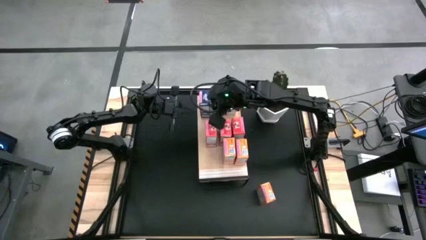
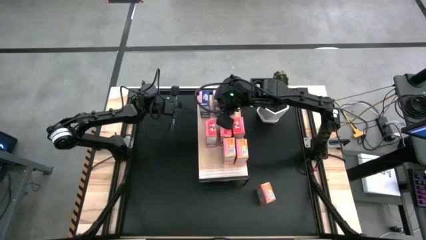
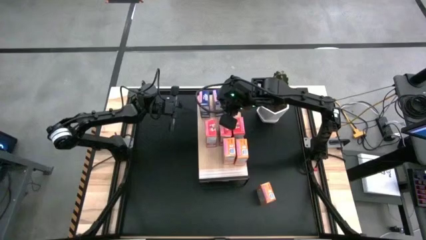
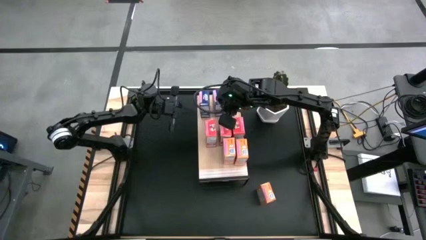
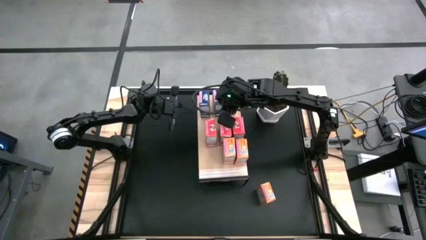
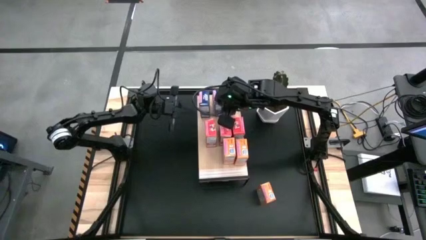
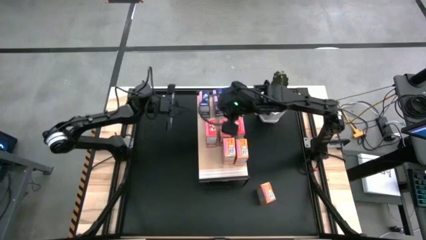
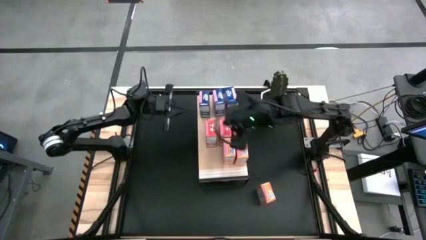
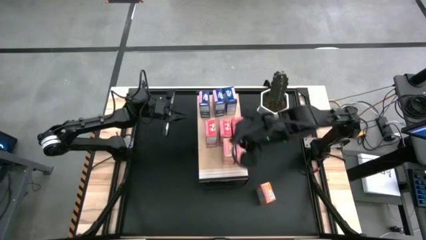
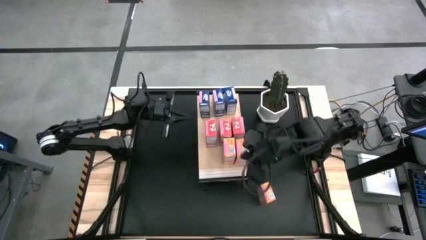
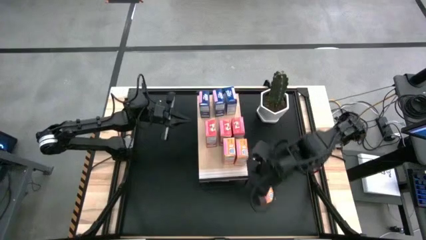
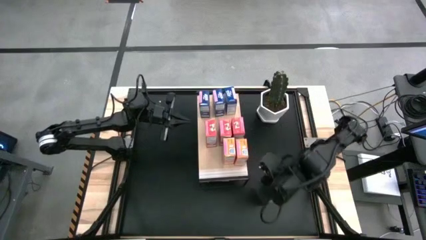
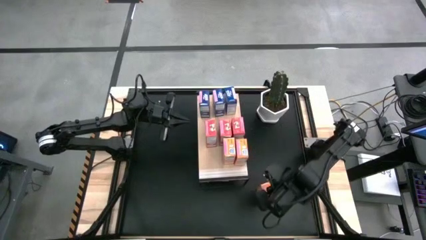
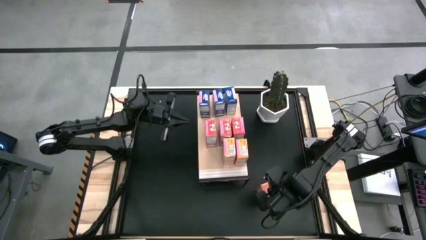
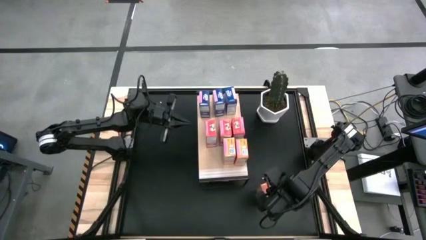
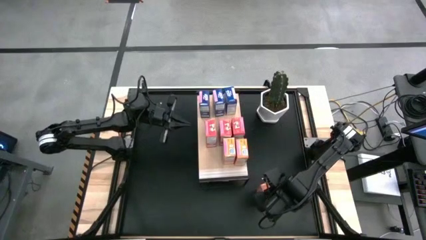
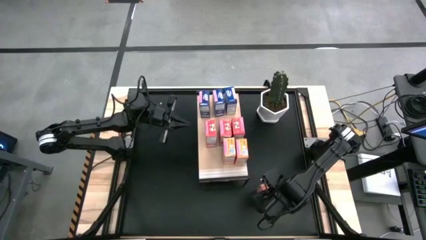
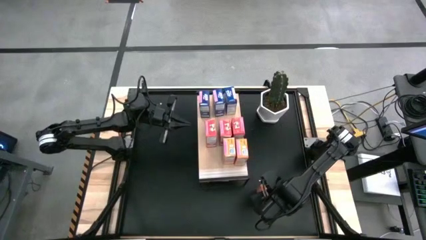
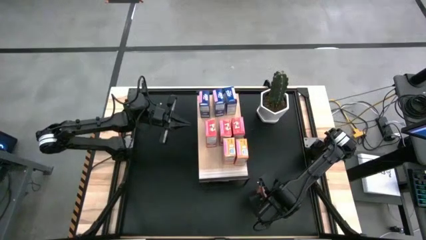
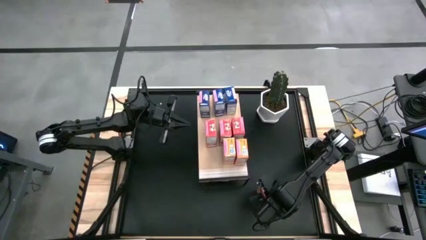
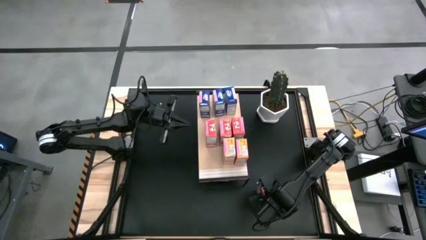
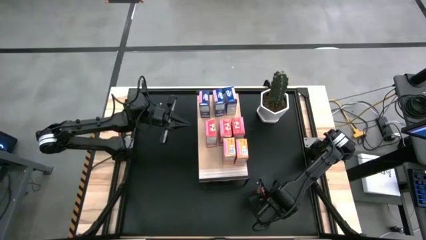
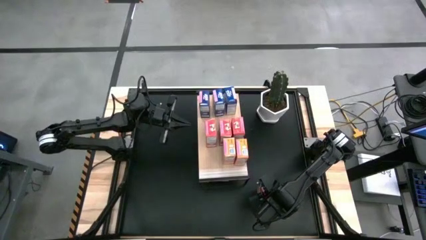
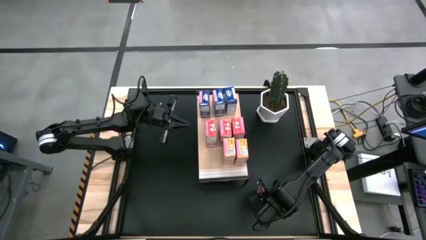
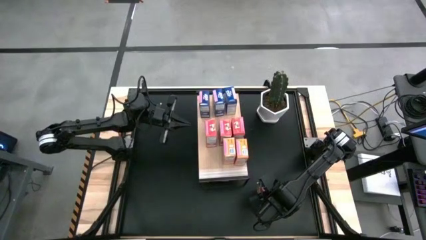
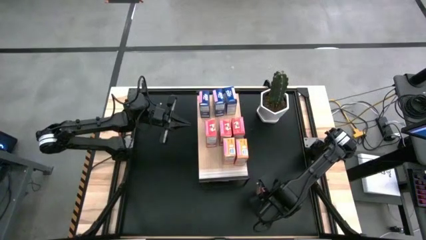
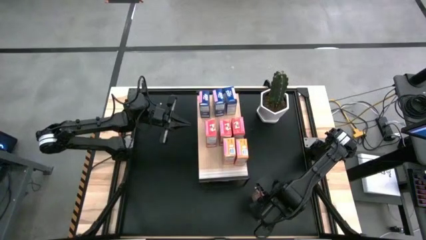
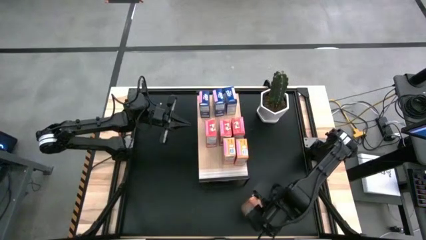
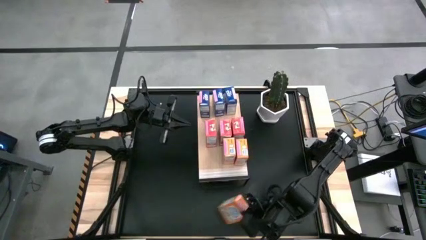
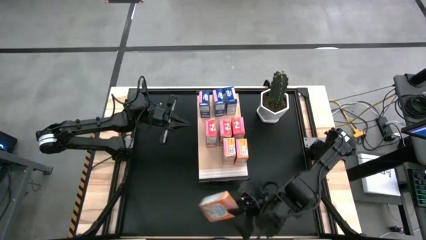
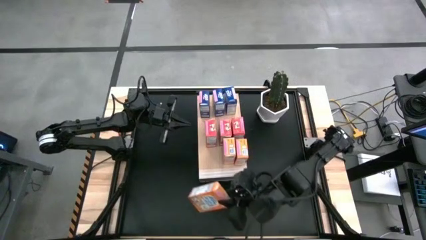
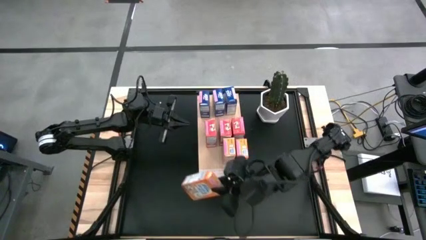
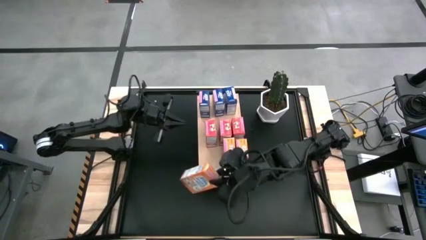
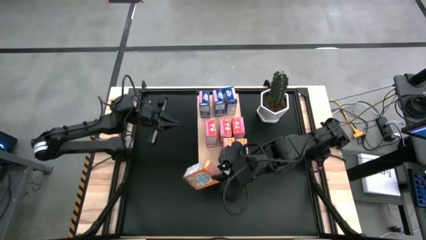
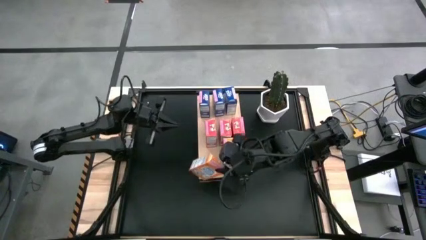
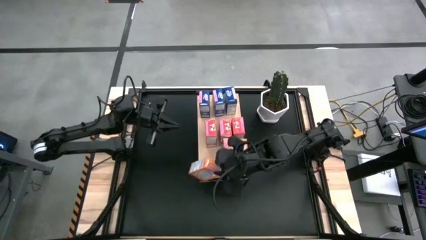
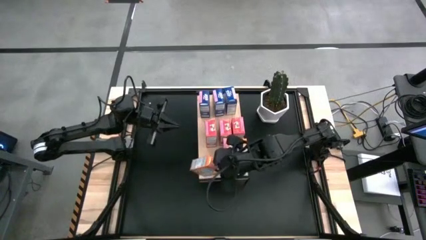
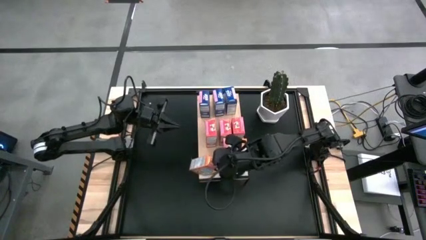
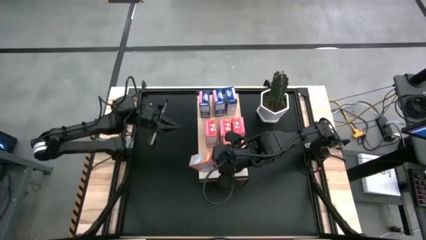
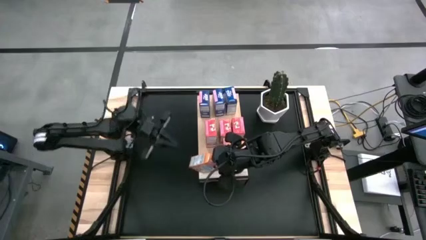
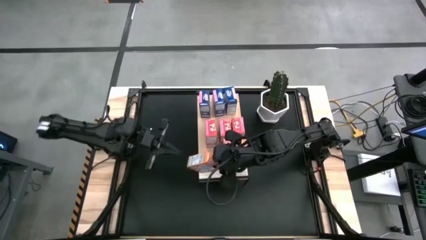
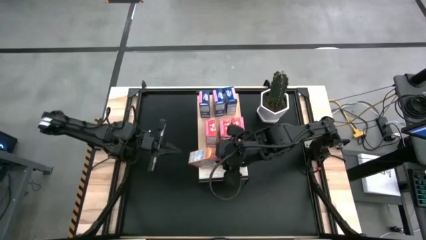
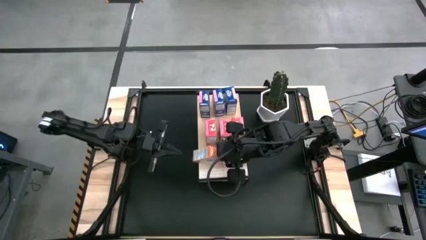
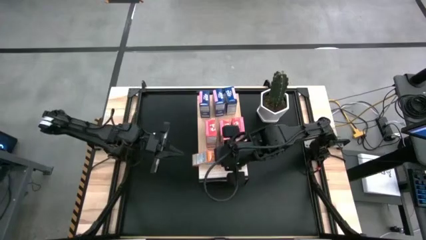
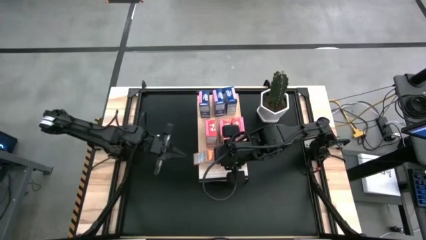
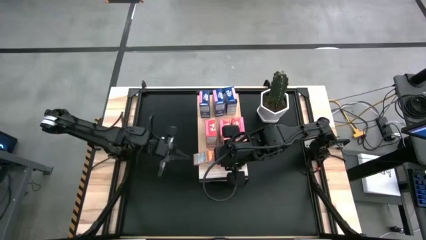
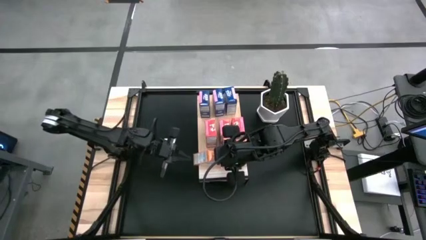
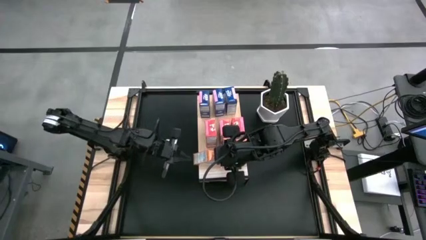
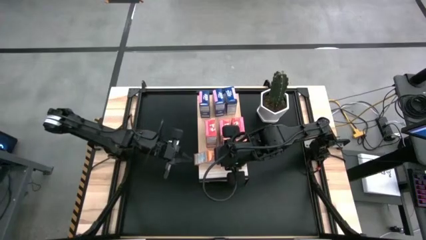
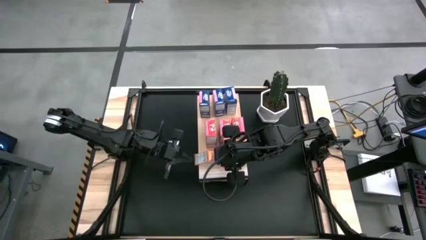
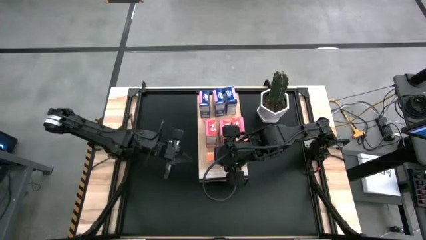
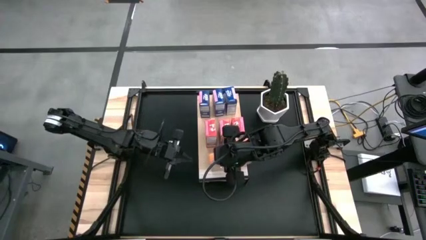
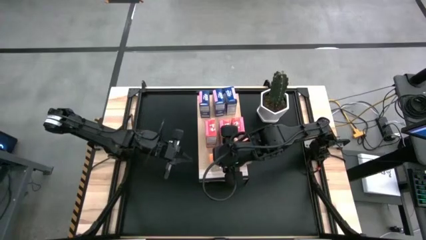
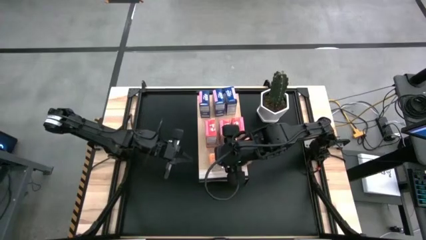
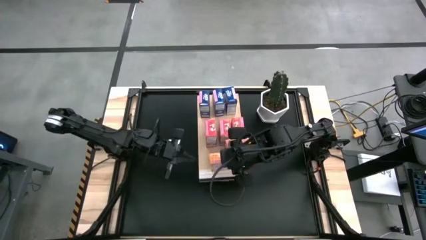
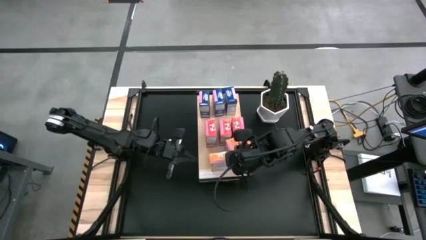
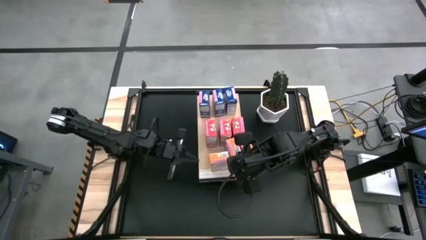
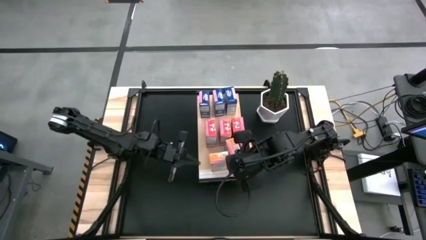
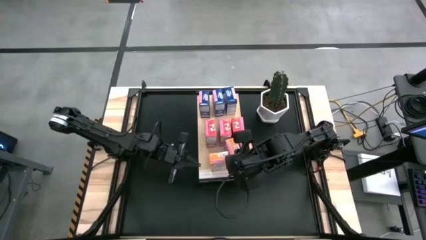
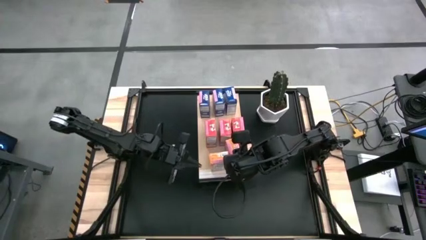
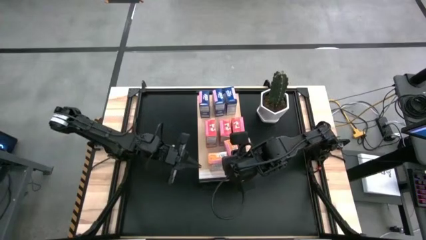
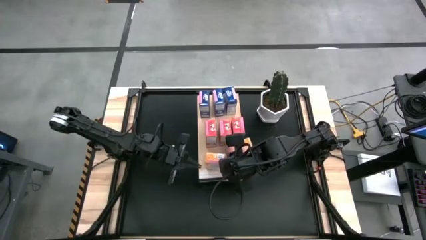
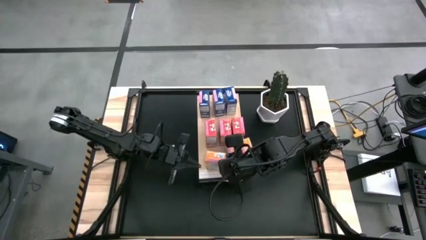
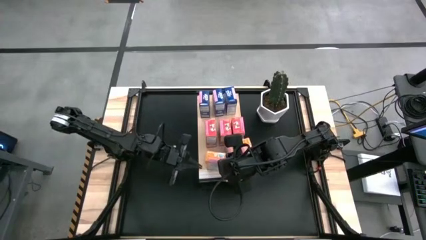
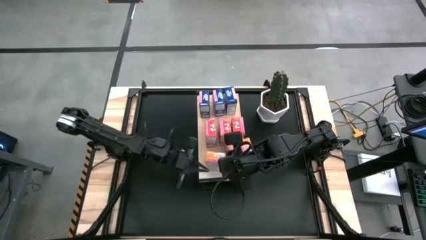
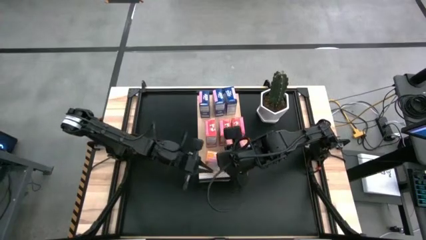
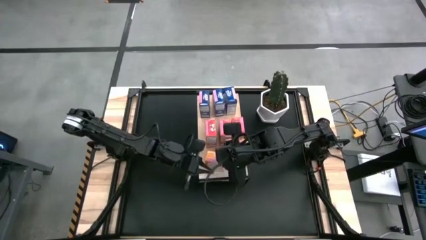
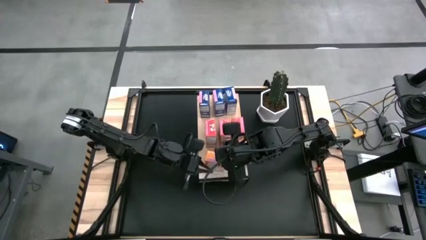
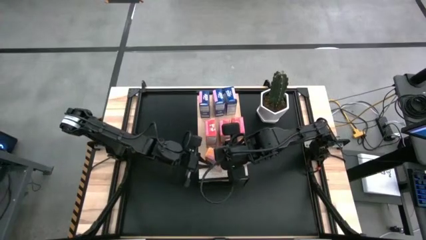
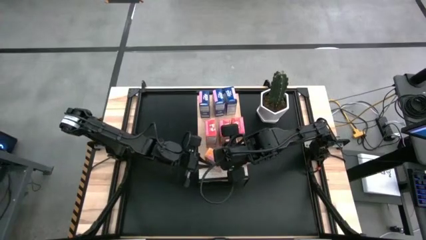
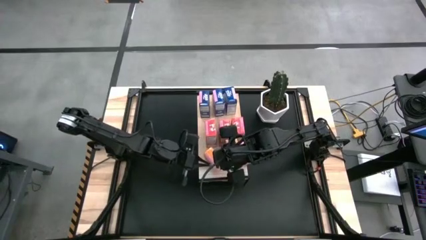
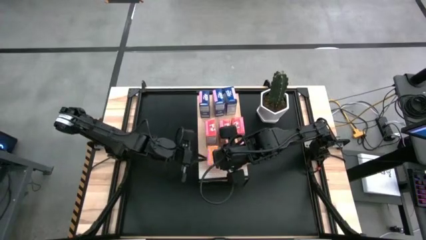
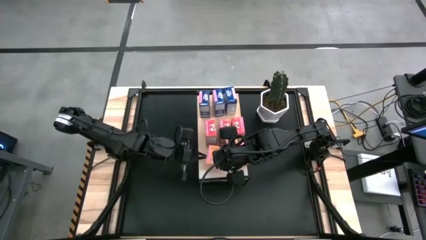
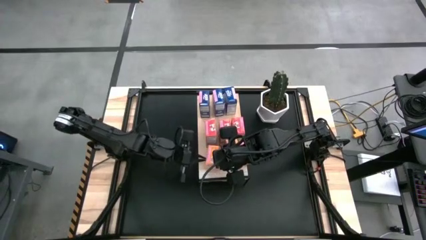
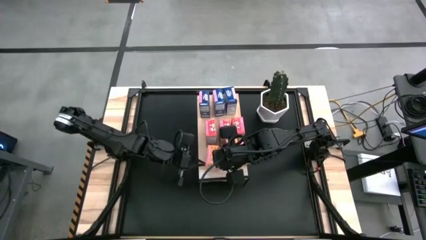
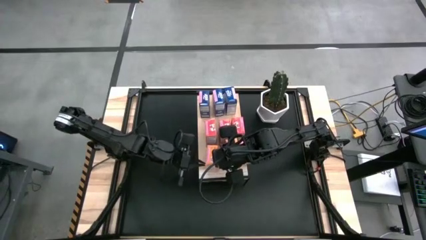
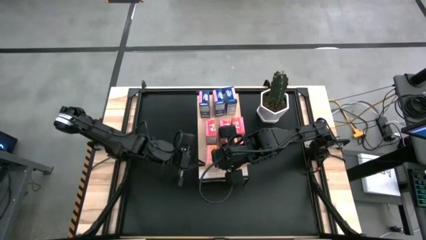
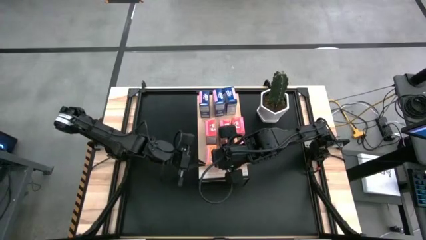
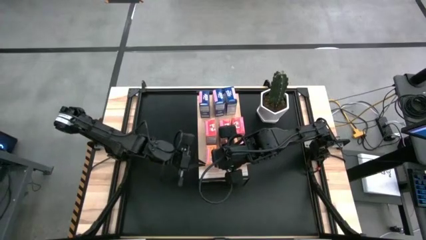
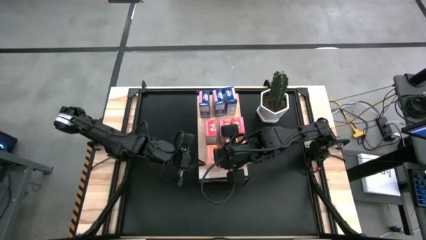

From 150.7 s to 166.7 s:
Task: Stack cereal on shelf
Put the orange cereal box aligned with the other orange cereal box on the shelf

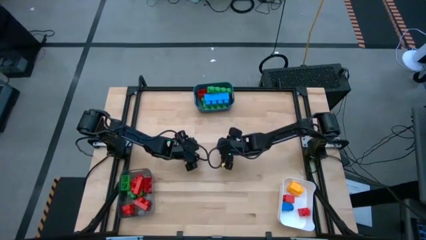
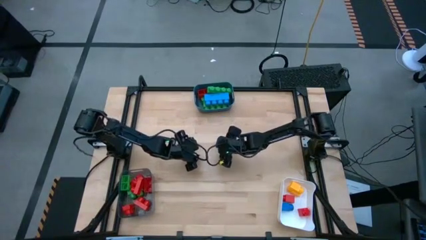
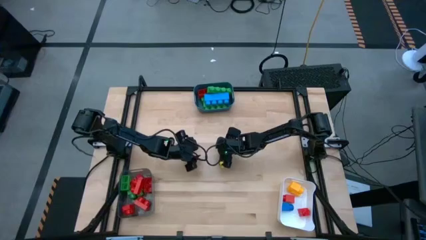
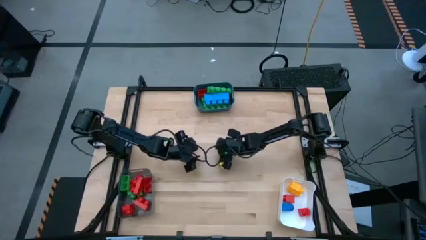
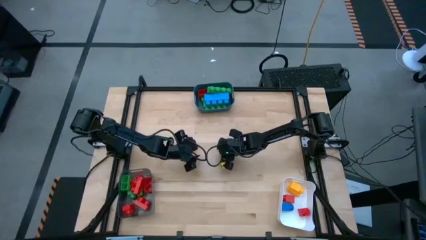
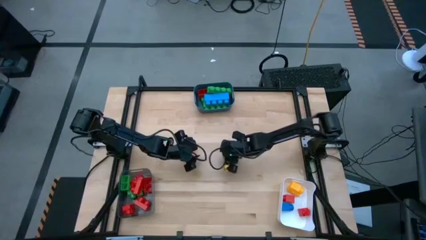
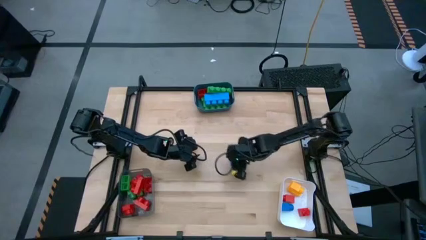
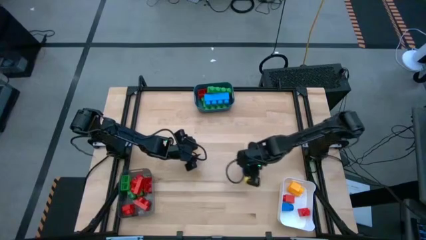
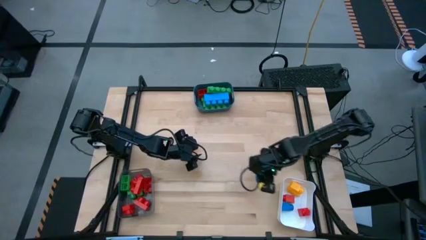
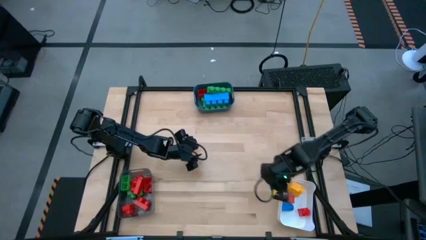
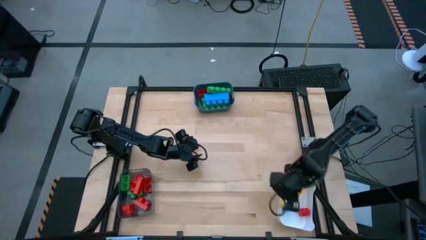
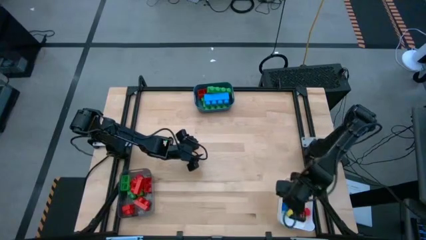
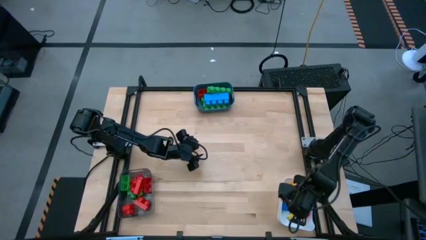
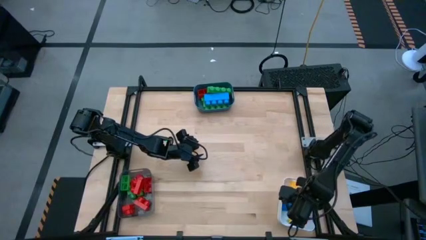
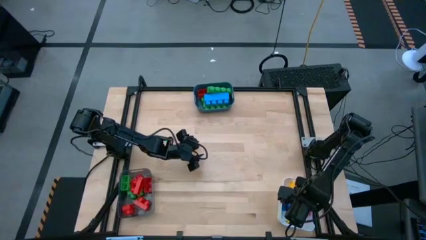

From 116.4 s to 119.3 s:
Task: Sort blocks by size
Put the blue game piece into the white container
